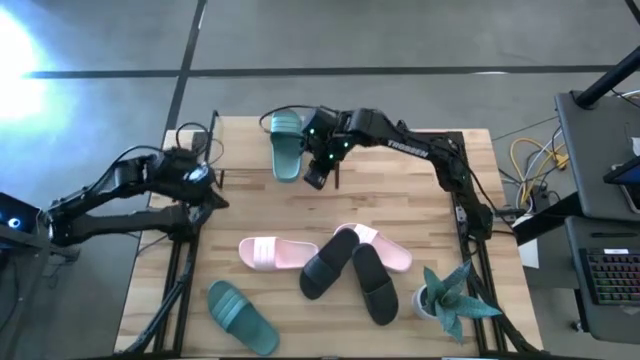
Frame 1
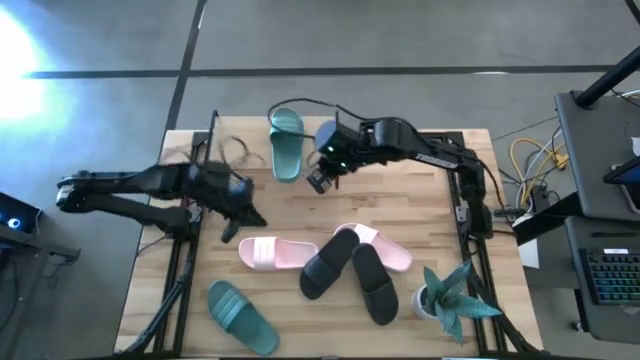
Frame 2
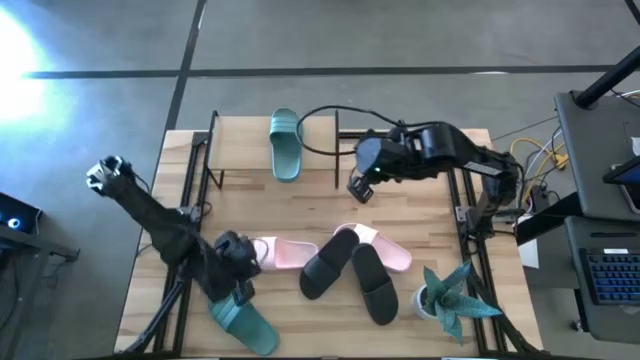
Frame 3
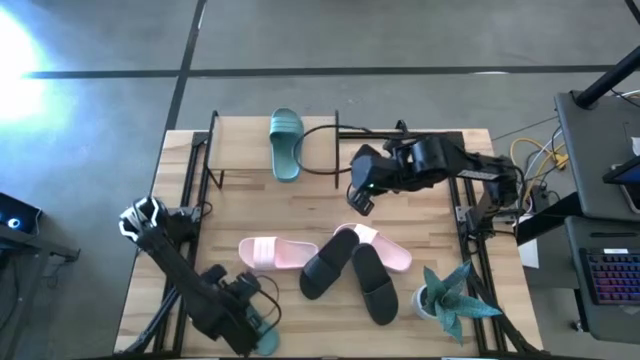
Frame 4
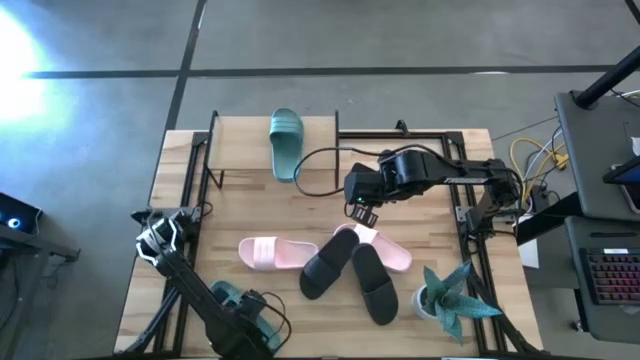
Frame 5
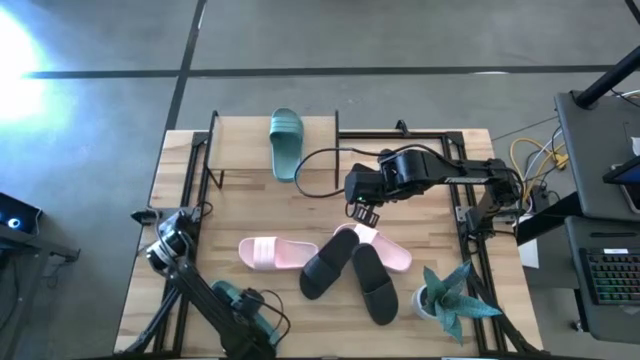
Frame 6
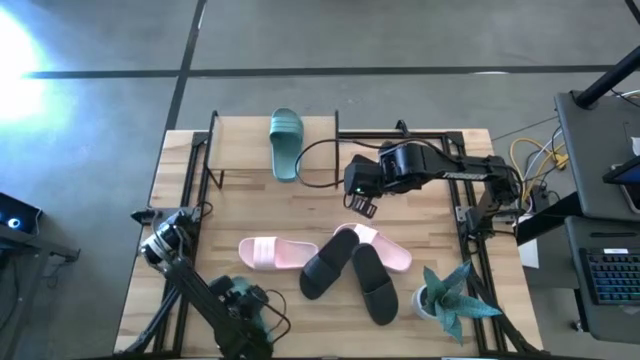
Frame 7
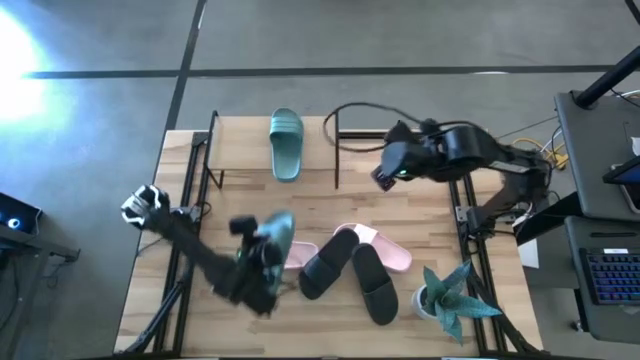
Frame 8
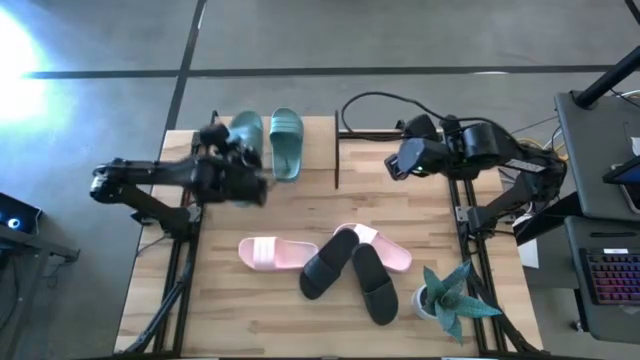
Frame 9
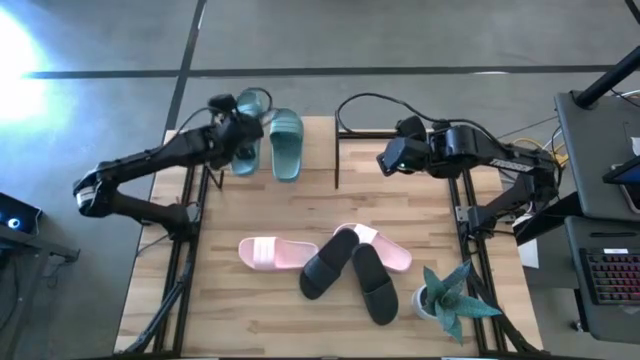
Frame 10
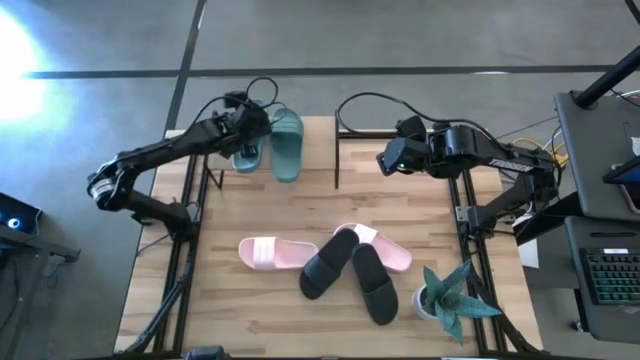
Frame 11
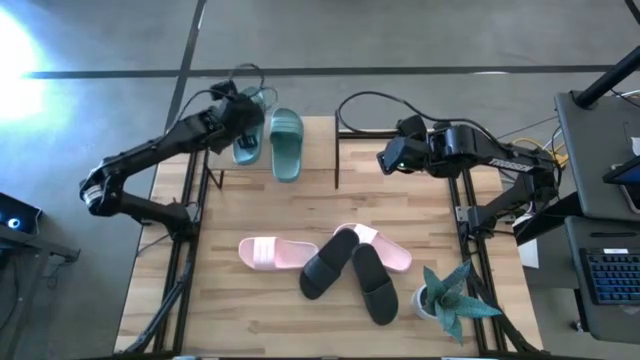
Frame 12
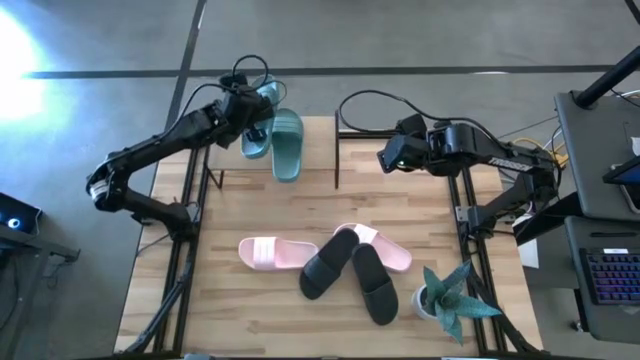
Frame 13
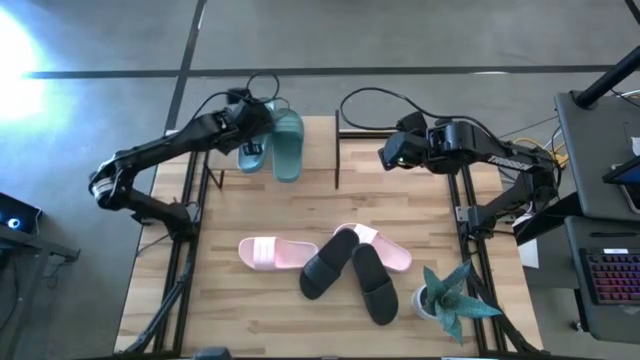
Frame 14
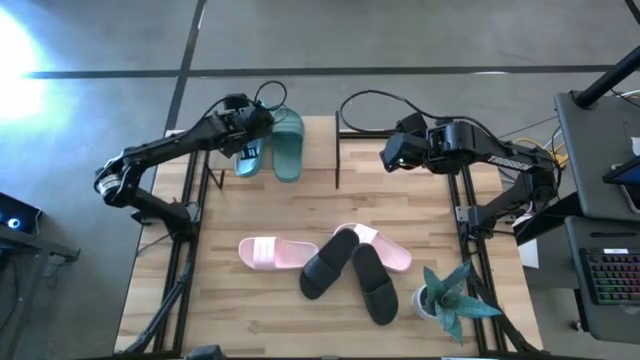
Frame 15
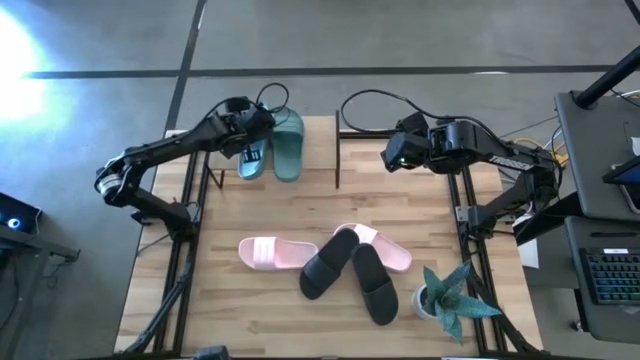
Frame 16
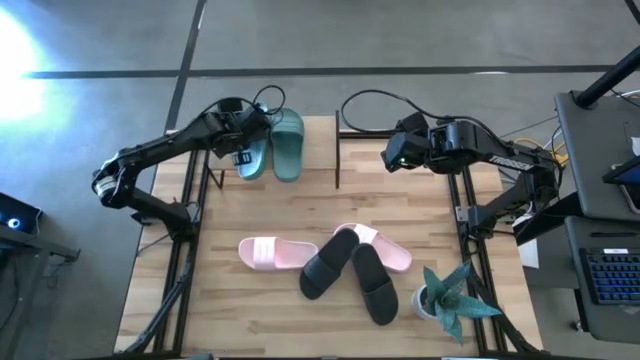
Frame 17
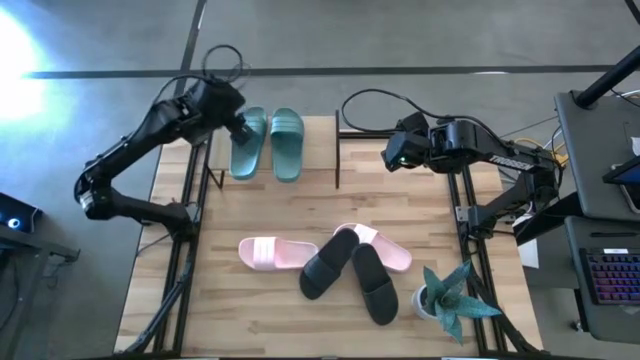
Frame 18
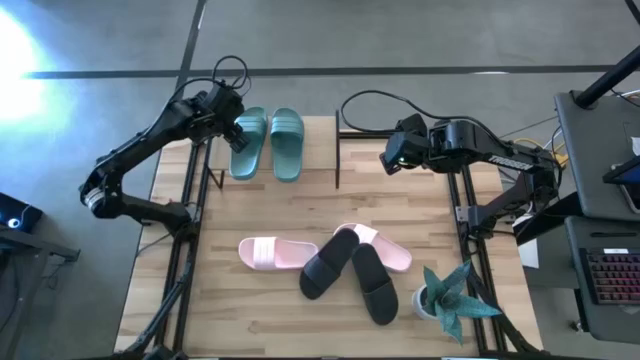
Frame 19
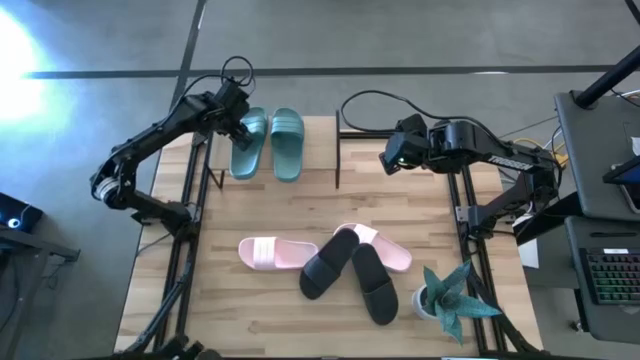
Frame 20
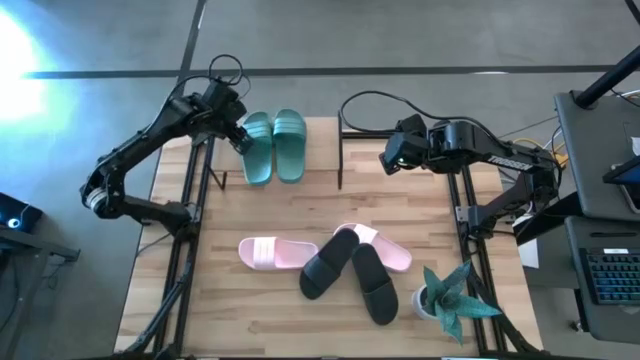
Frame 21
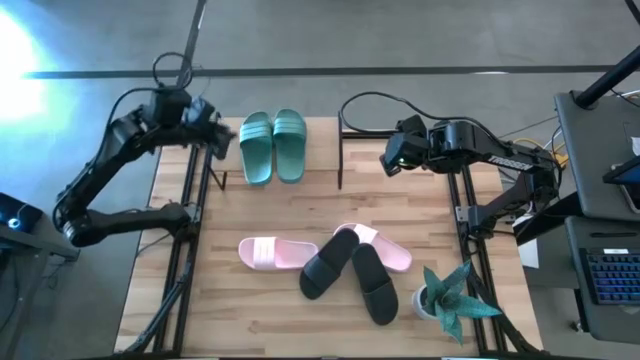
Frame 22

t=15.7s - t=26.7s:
Task: Pick and place slides into the shelf
Put the green slide on the shelf

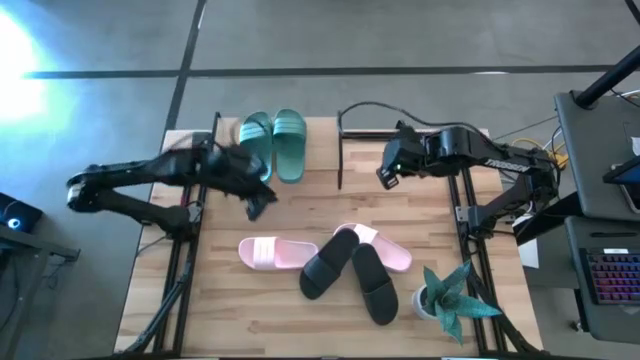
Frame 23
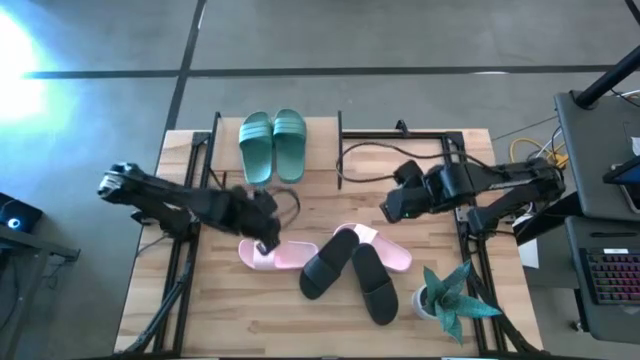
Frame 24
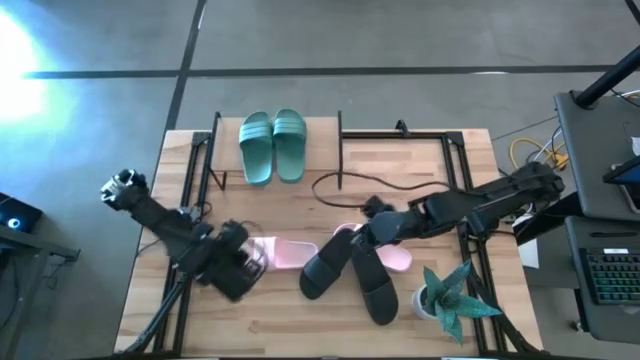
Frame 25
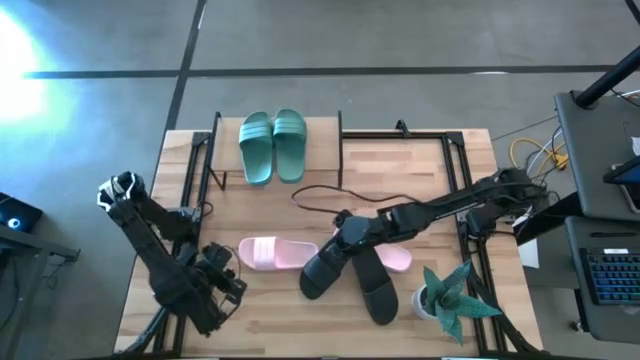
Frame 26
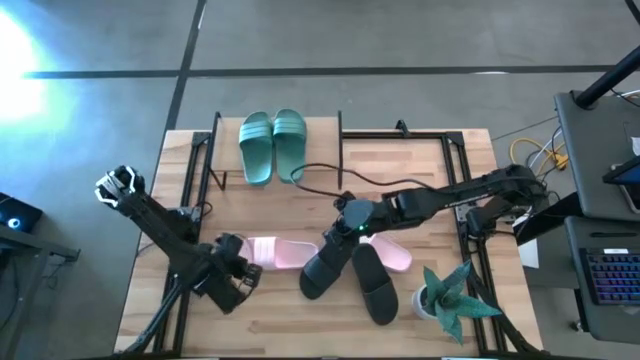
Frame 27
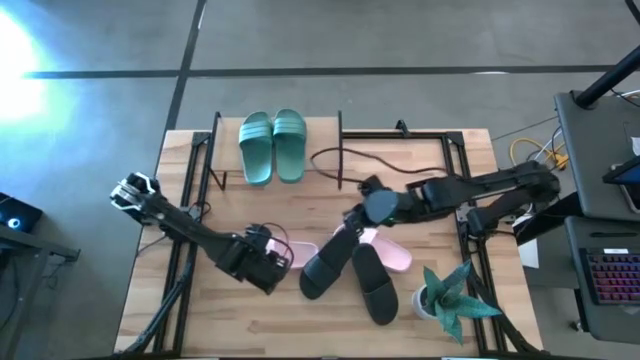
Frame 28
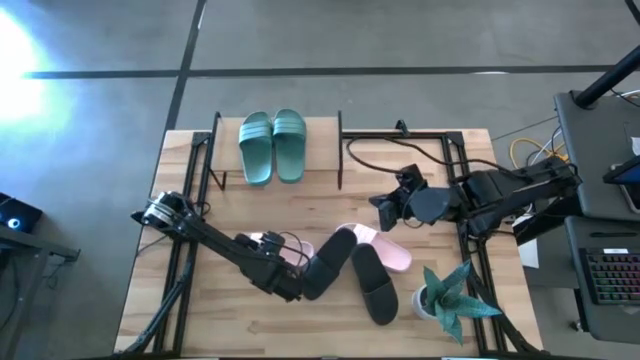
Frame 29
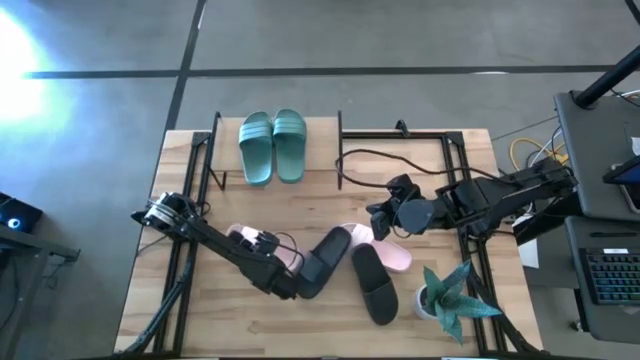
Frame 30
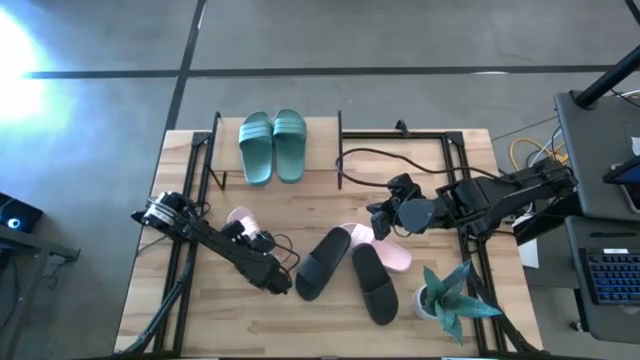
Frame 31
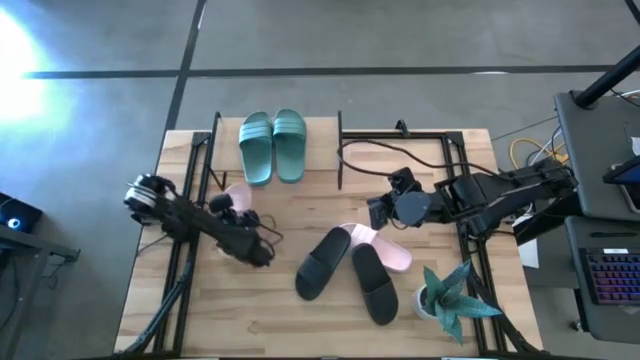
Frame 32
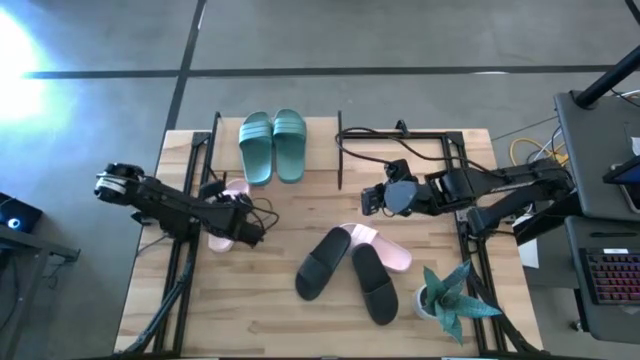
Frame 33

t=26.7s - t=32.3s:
Put the left pink slide under the shelf

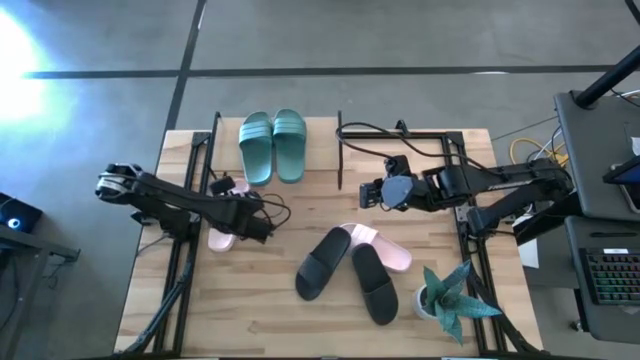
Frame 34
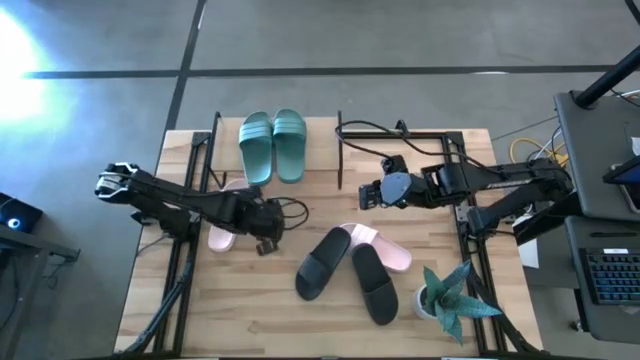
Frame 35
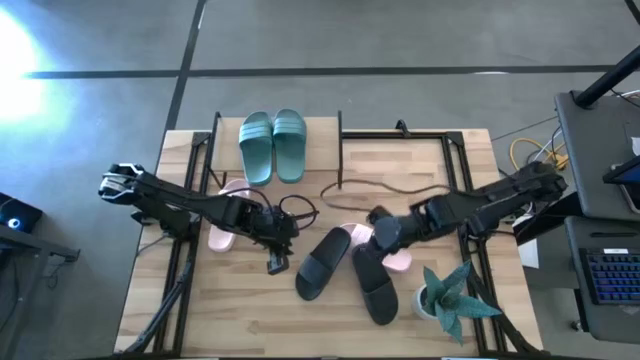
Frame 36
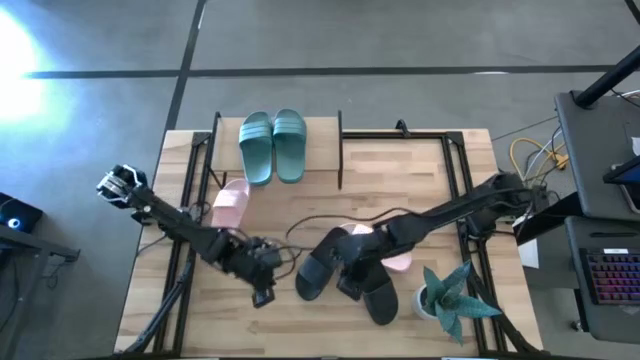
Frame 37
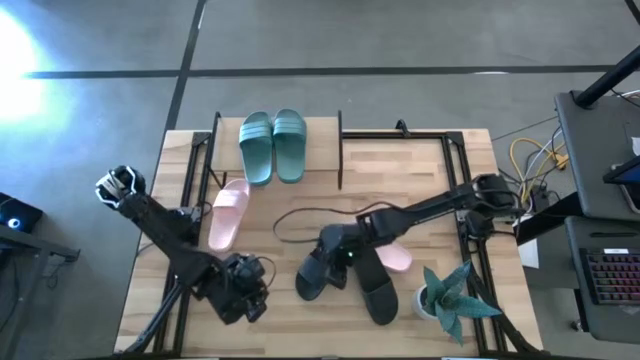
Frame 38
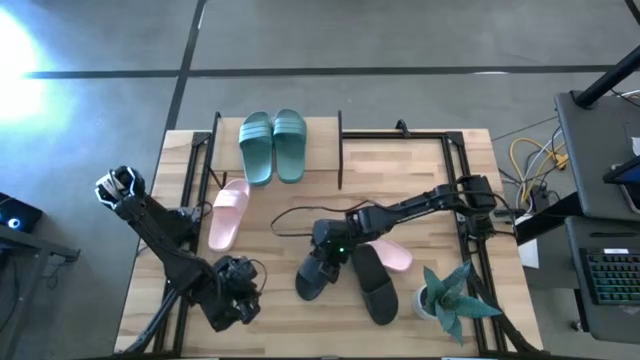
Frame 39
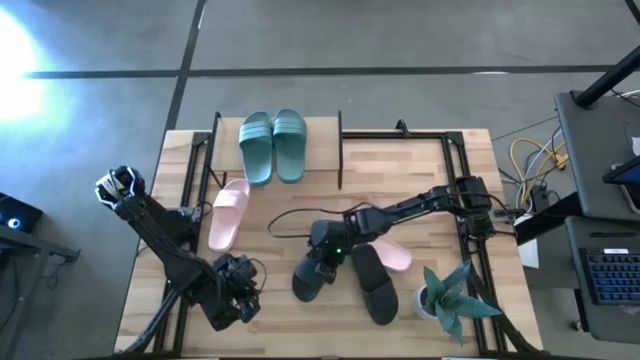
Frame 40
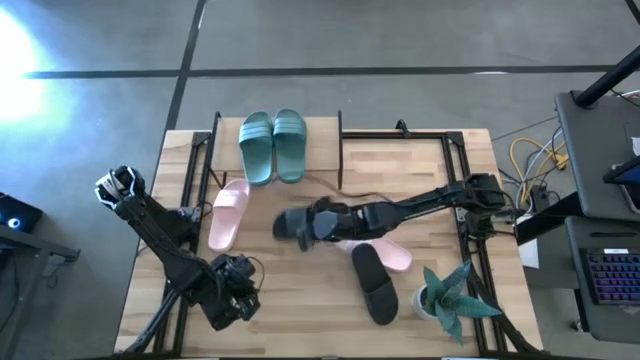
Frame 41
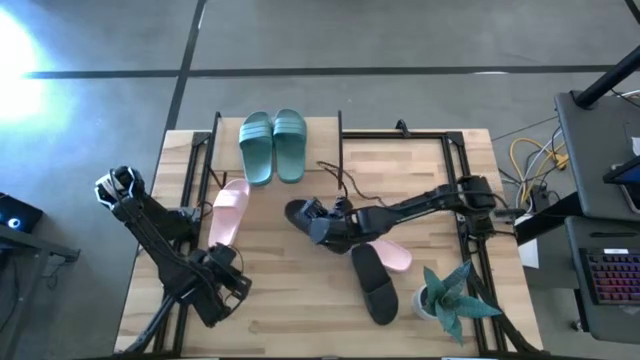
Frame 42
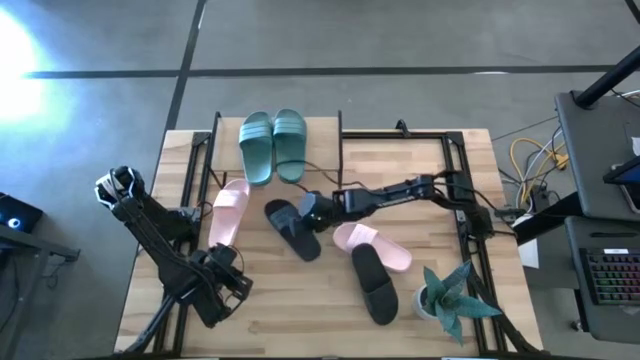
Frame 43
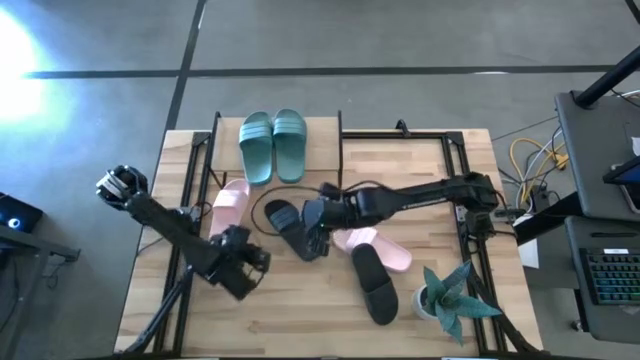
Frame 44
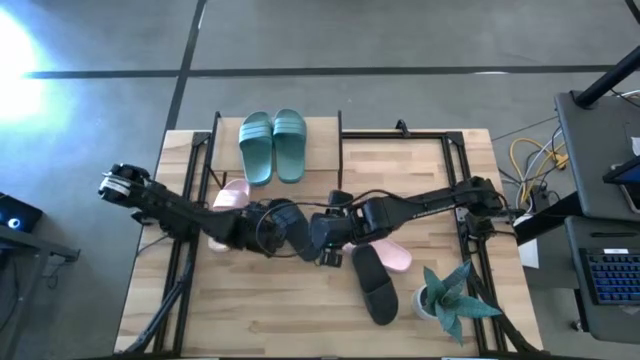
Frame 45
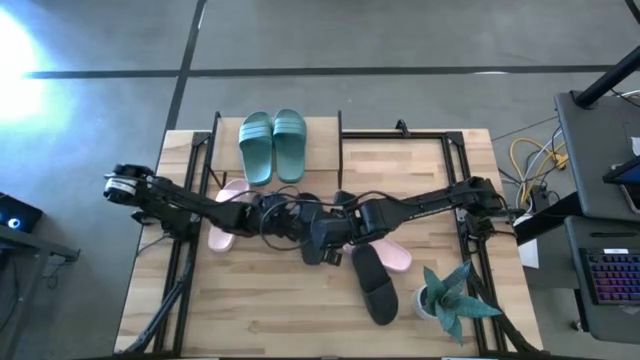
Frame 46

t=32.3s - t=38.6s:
Put the left black slide under the shelf
